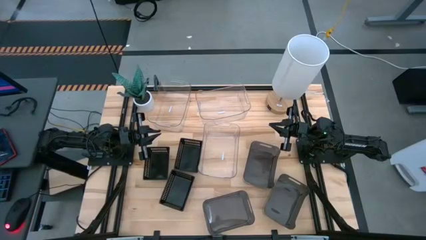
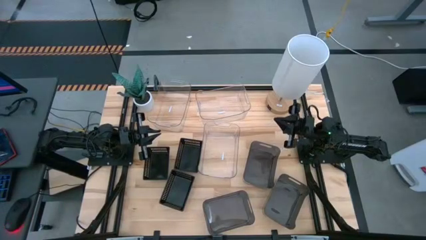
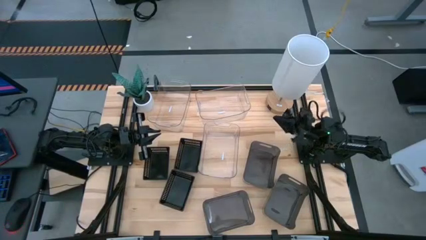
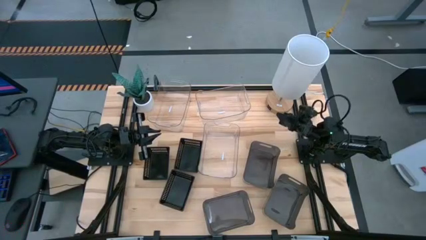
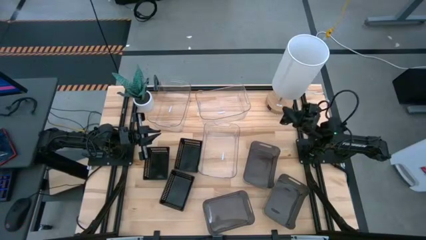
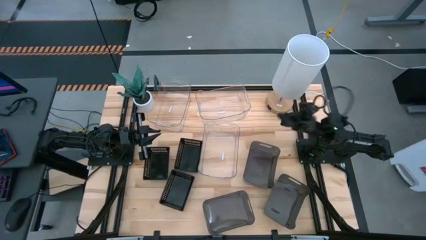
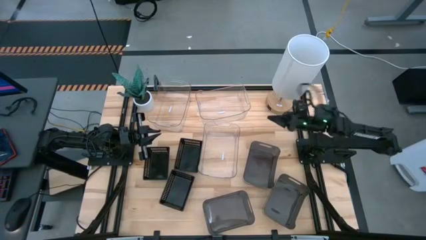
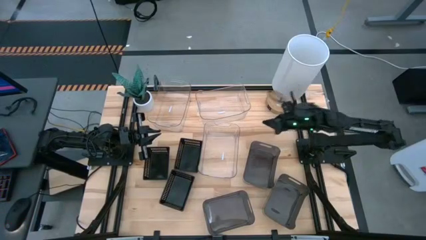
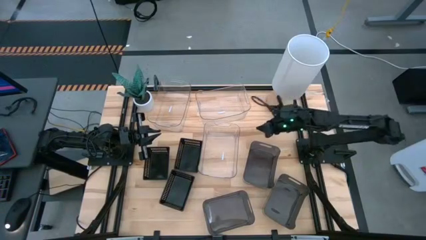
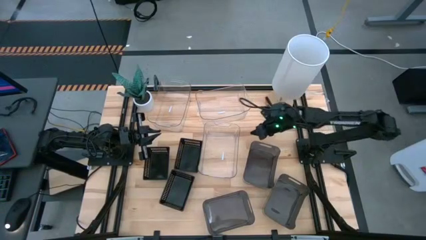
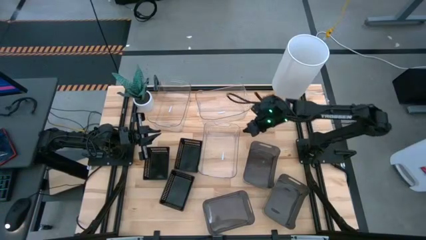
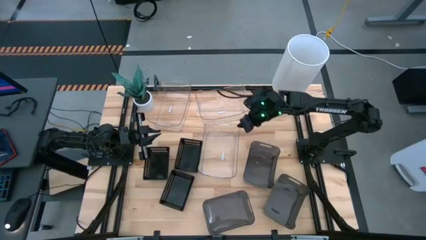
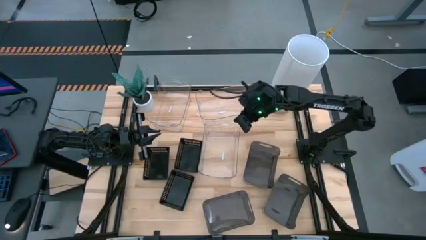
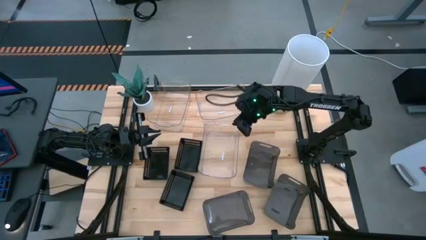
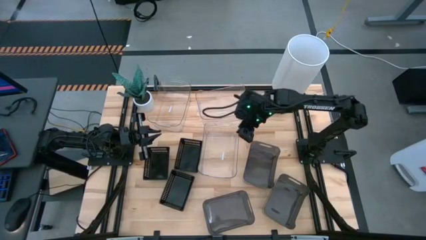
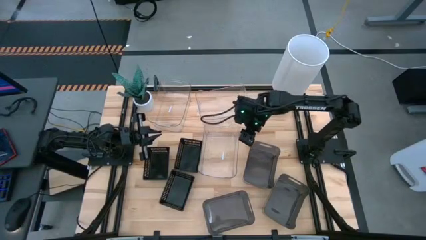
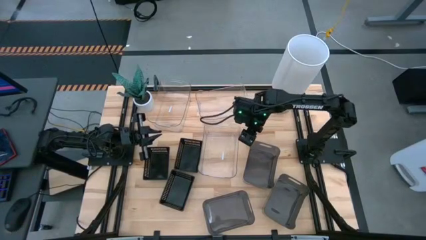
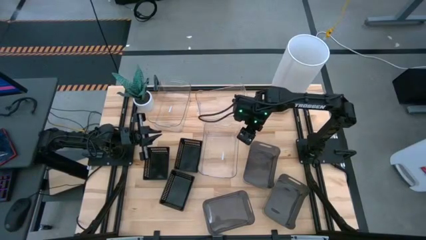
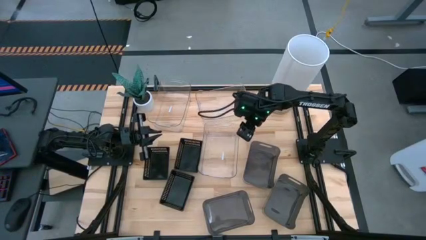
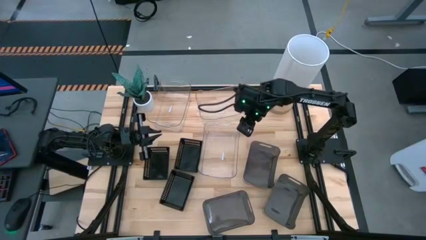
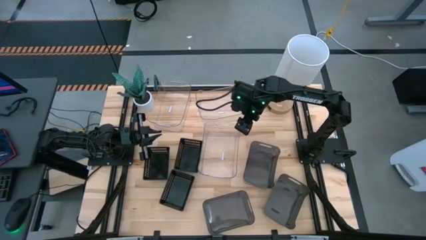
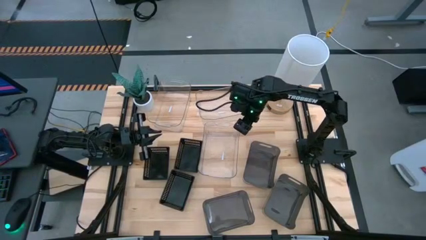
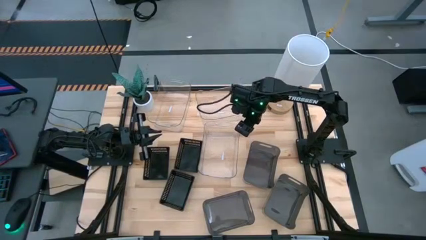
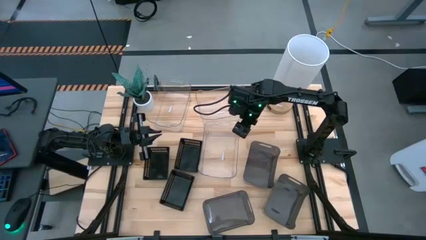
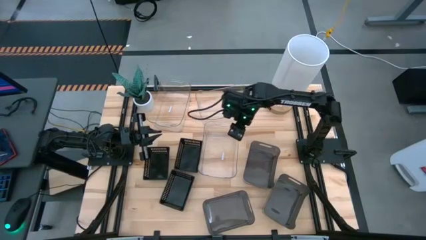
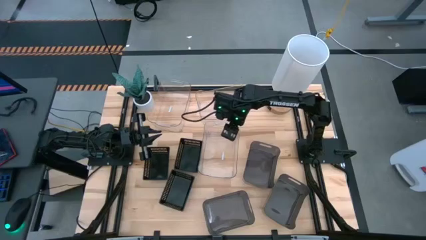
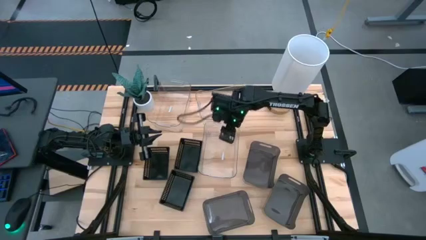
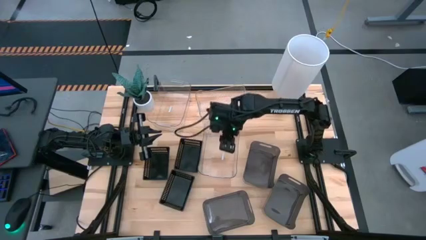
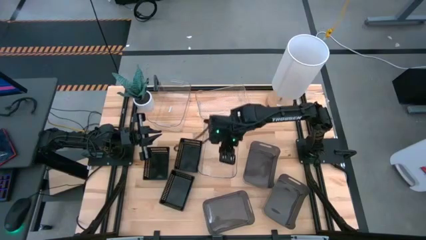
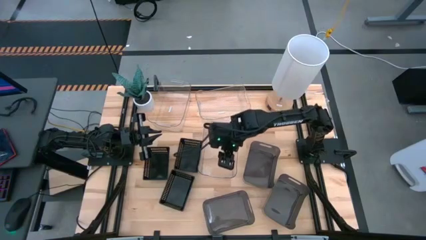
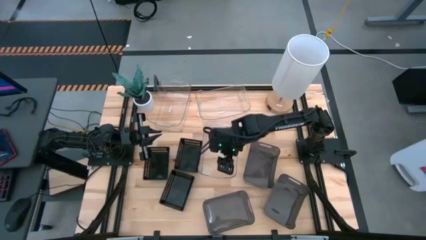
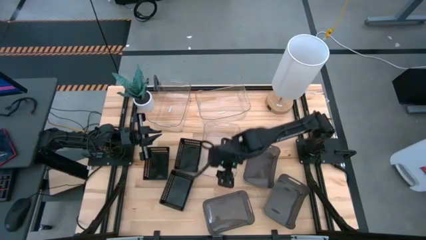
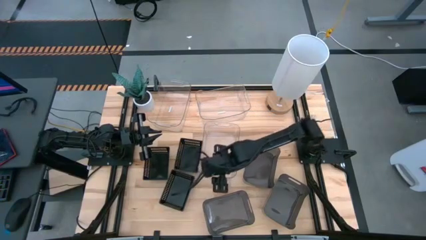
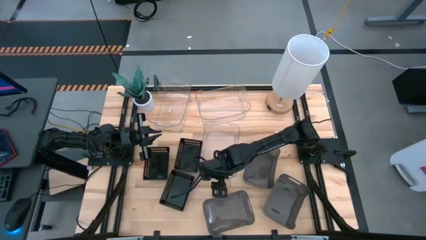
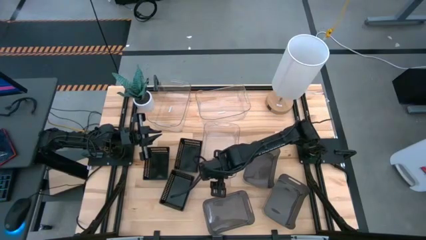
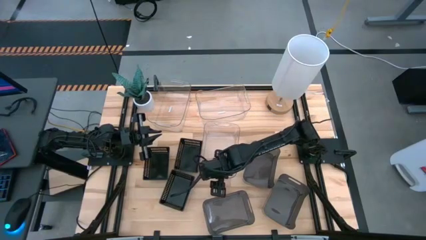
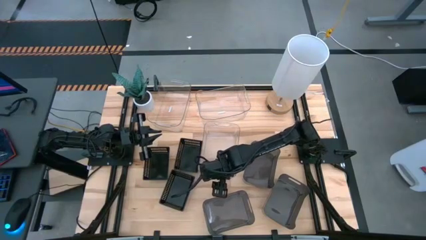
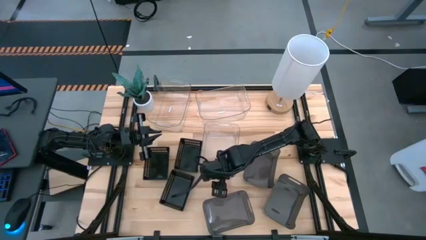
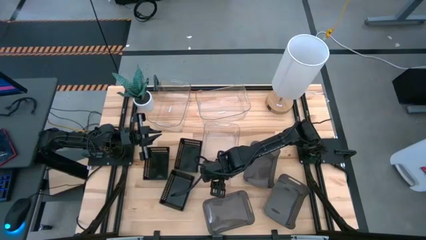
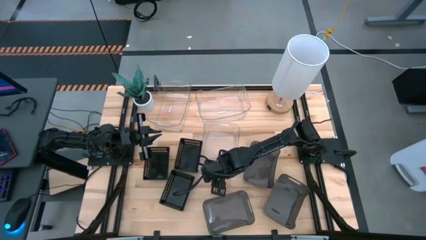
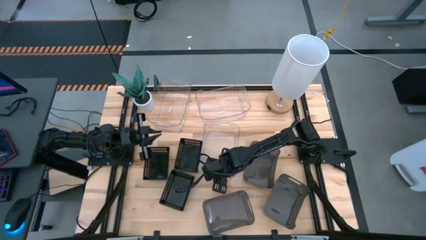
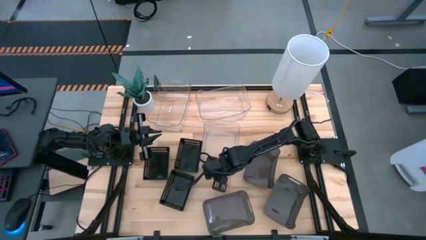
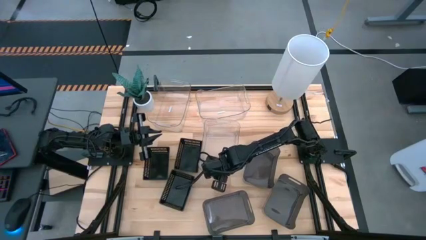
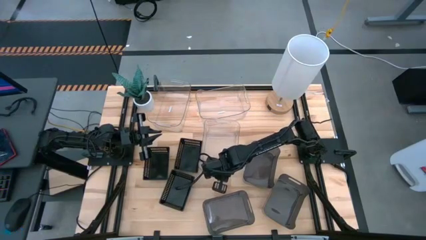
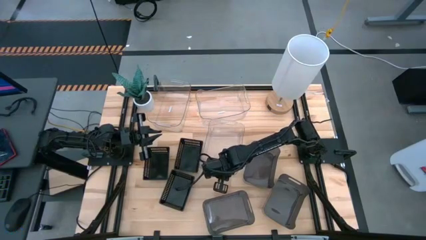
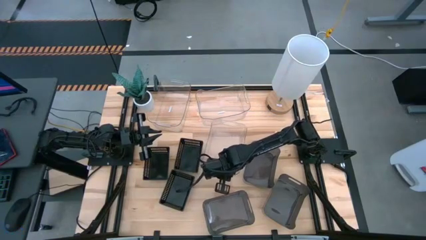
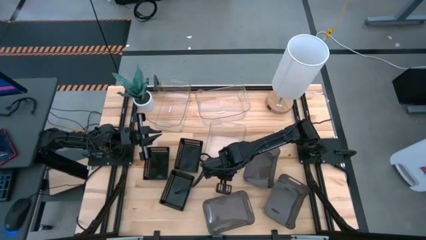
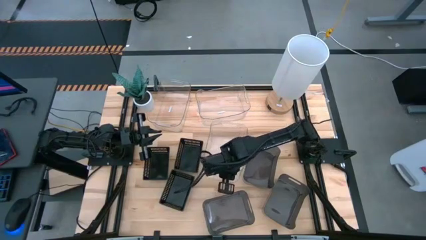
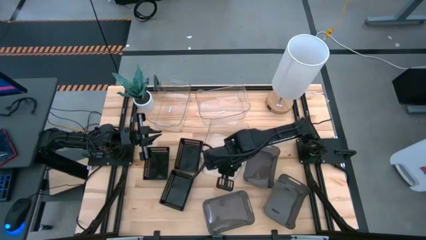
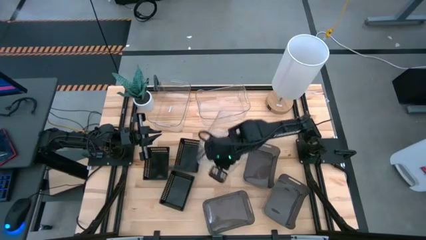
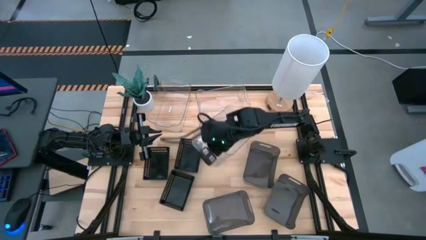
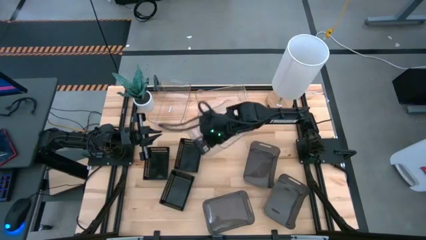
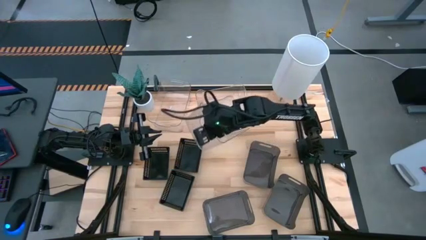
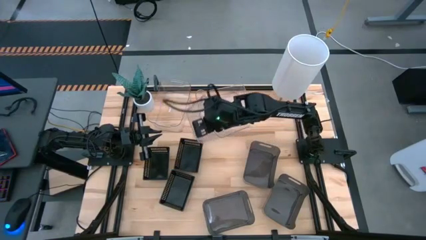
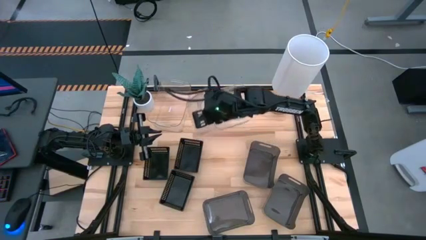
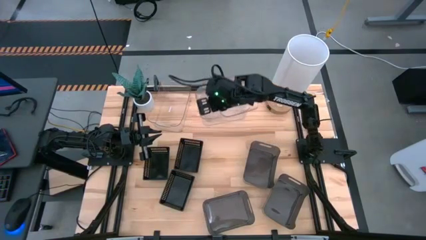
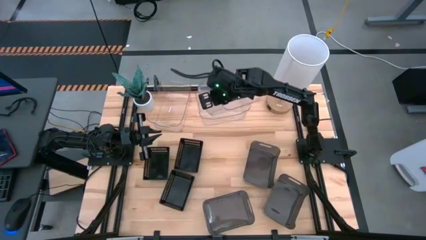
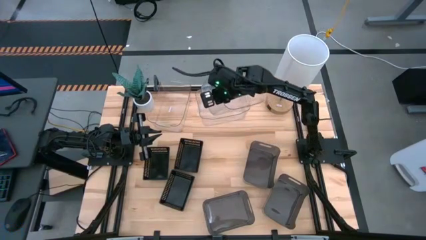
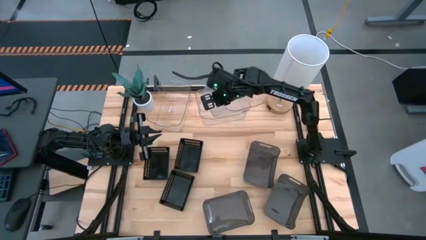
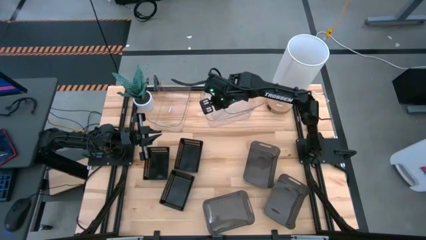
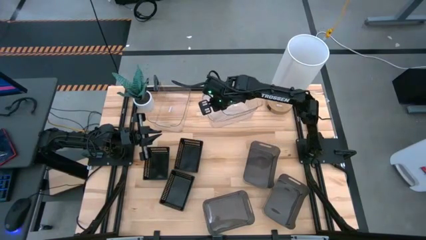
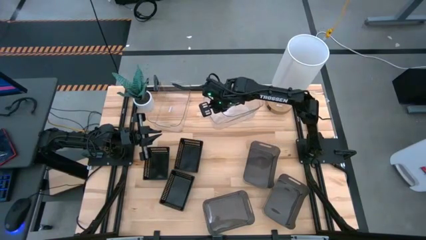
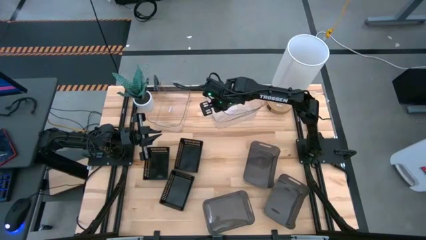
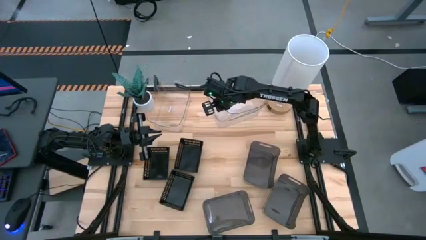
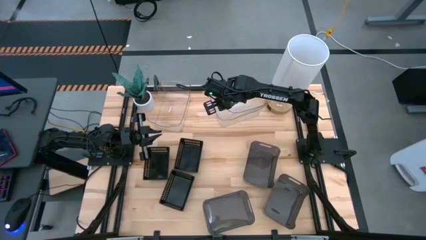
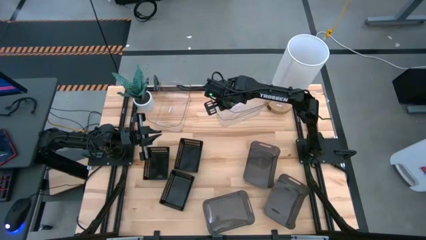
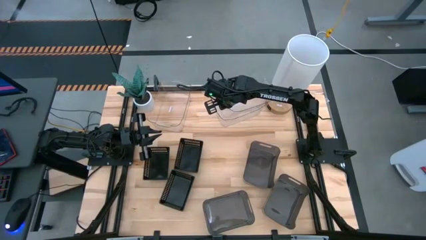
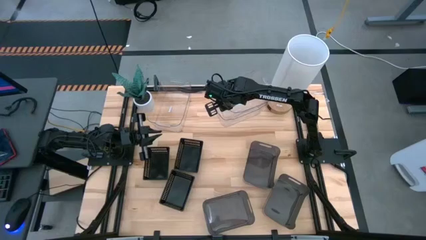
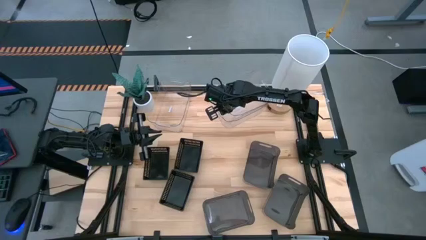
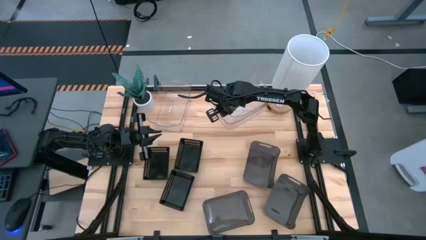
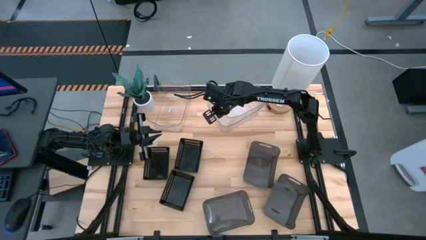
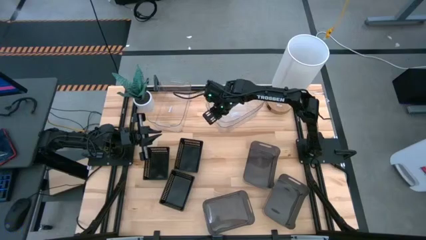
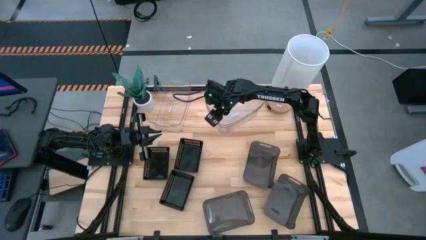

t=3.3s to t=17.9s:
Stack the bottom transparent bin on top of the top right transparent bin
